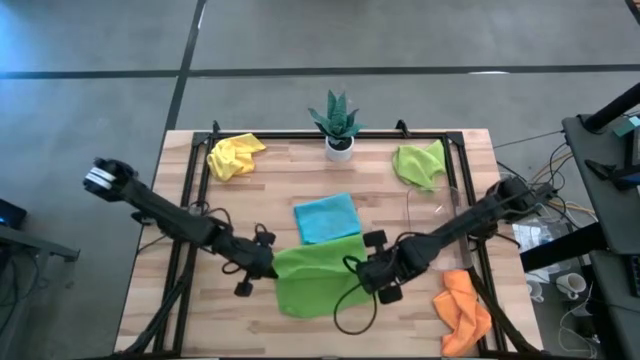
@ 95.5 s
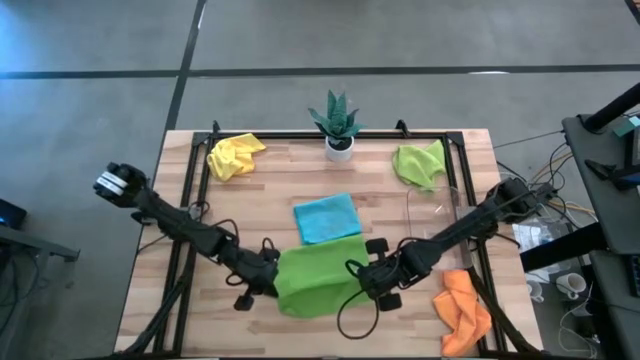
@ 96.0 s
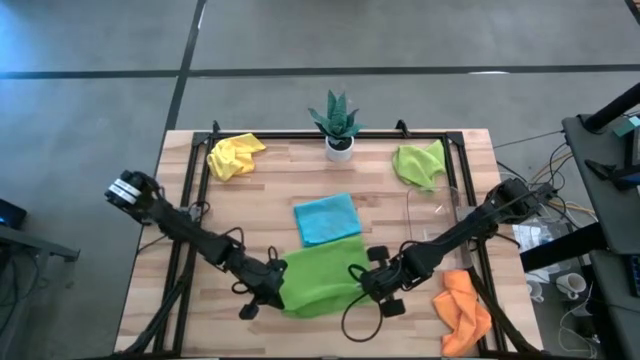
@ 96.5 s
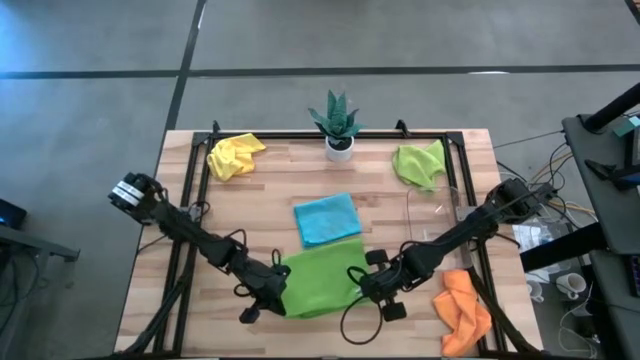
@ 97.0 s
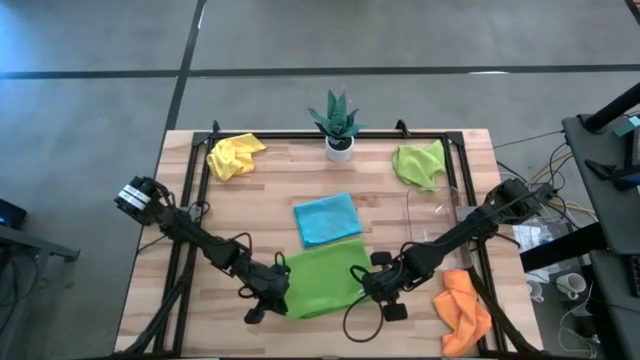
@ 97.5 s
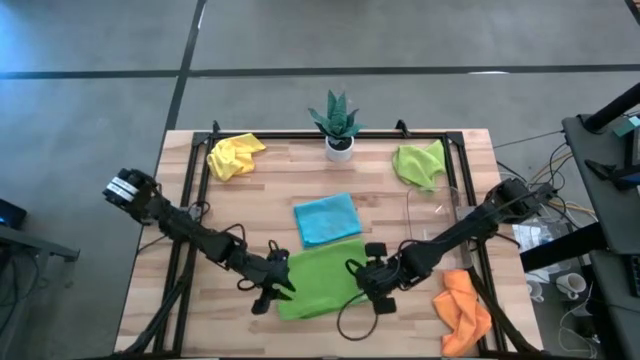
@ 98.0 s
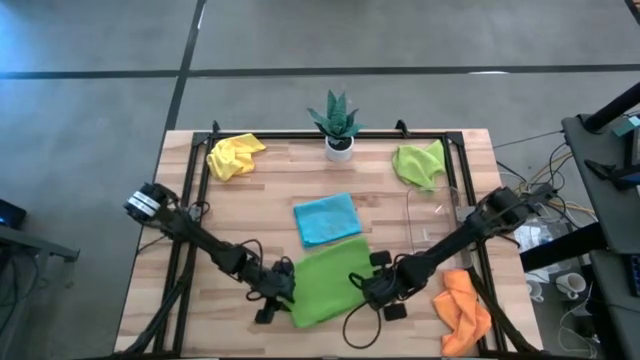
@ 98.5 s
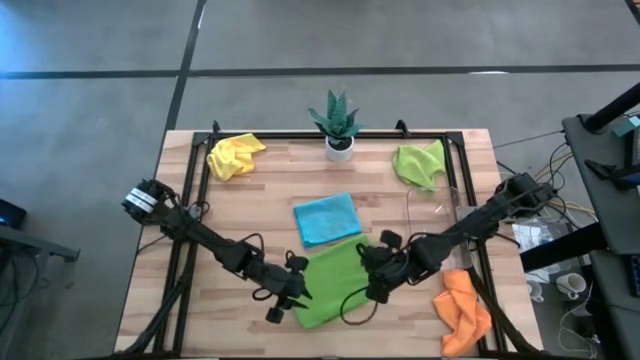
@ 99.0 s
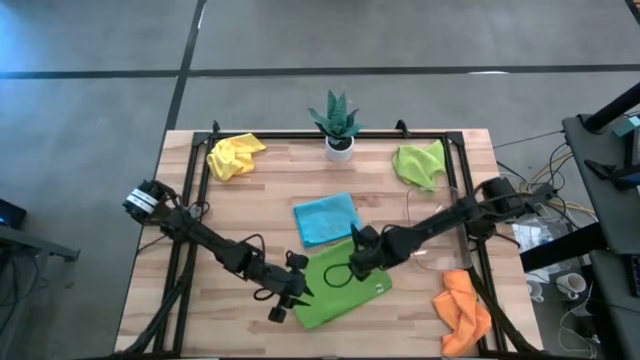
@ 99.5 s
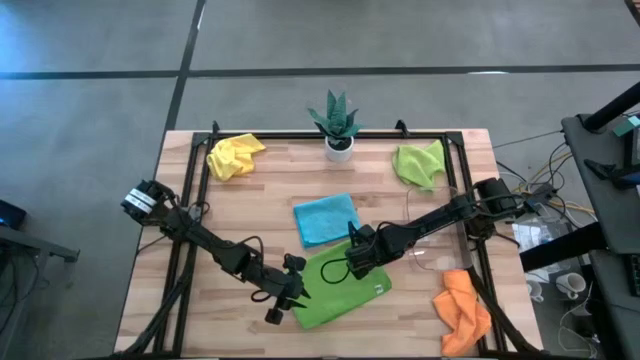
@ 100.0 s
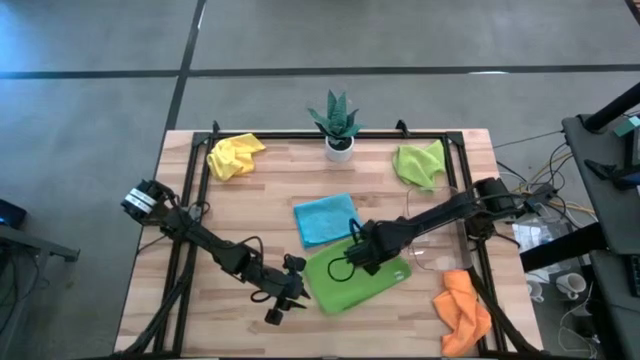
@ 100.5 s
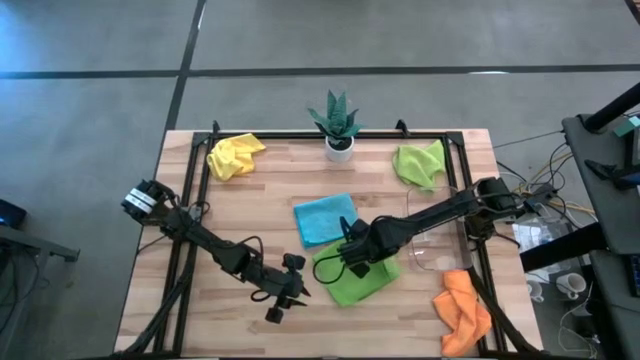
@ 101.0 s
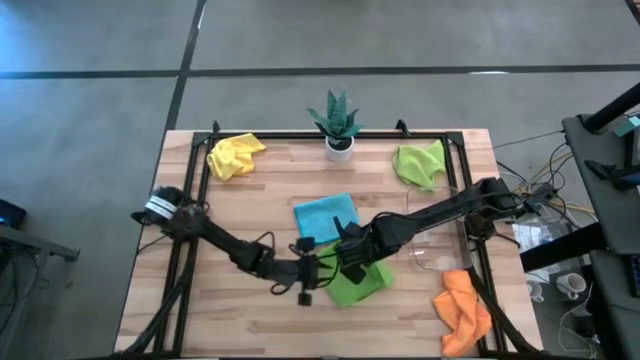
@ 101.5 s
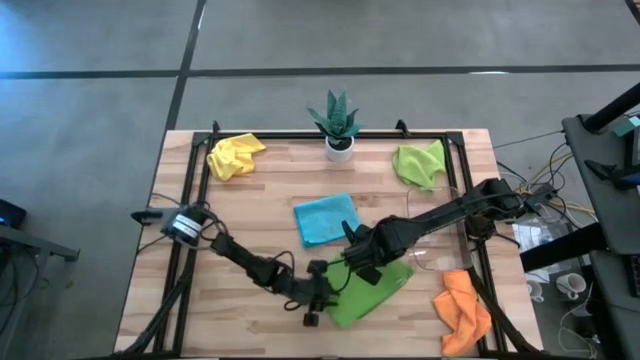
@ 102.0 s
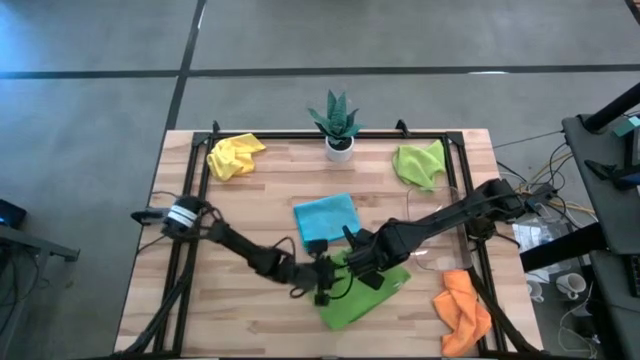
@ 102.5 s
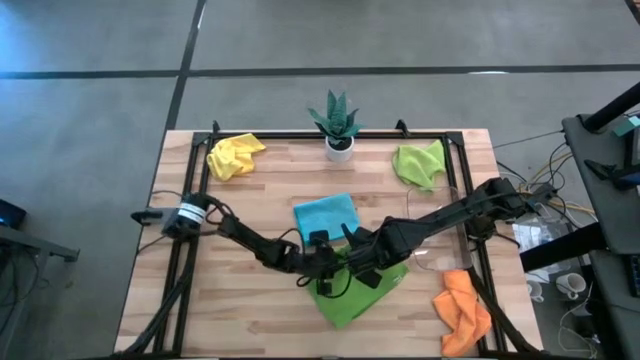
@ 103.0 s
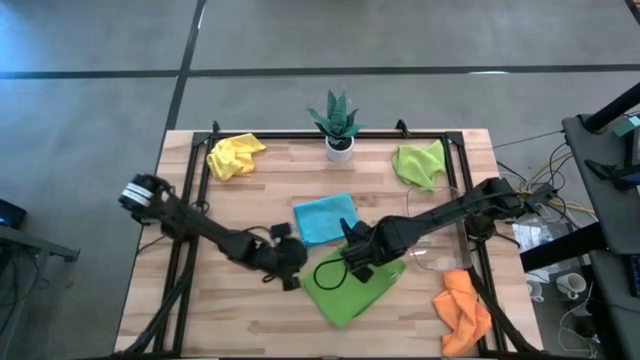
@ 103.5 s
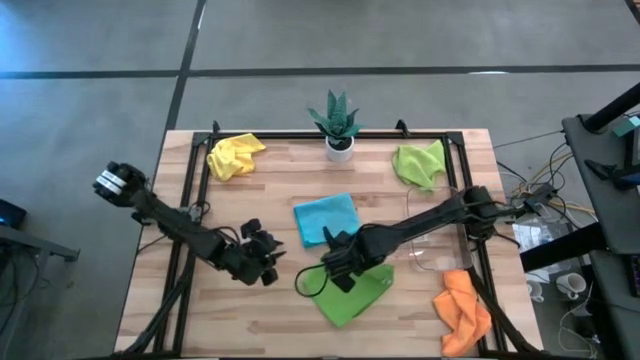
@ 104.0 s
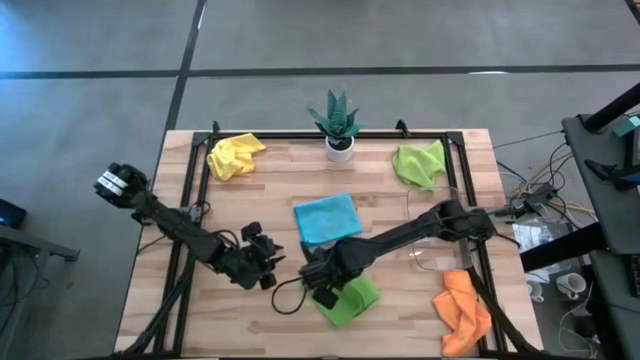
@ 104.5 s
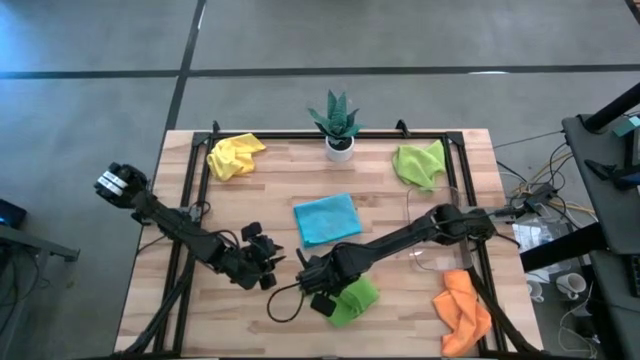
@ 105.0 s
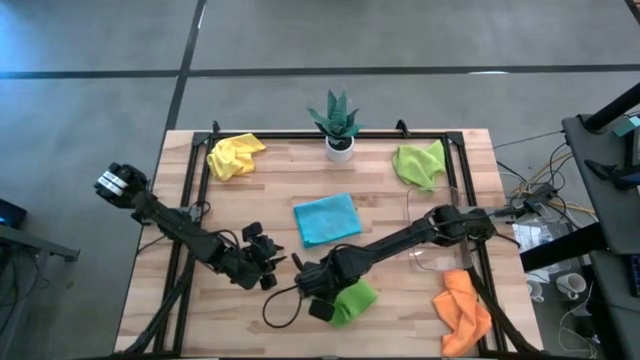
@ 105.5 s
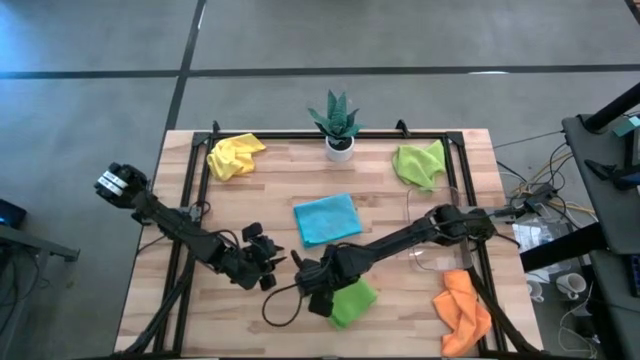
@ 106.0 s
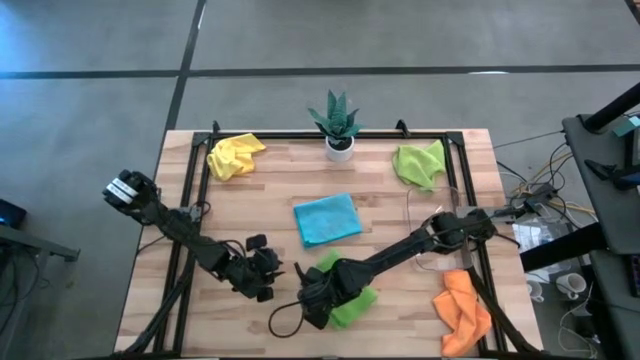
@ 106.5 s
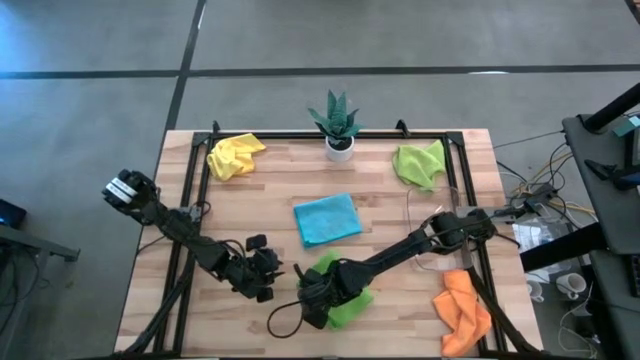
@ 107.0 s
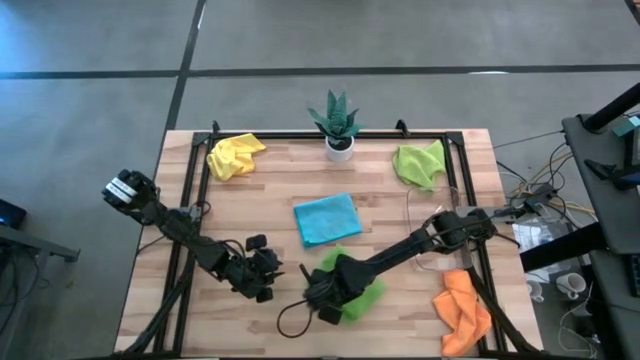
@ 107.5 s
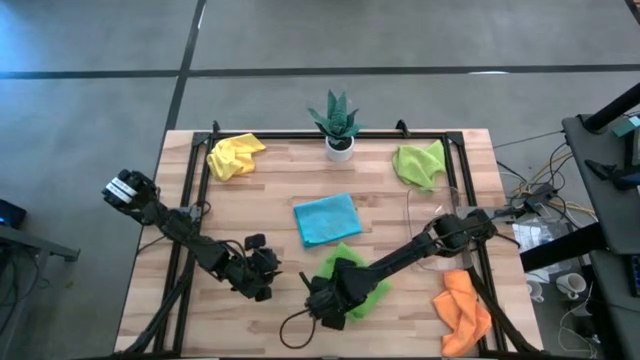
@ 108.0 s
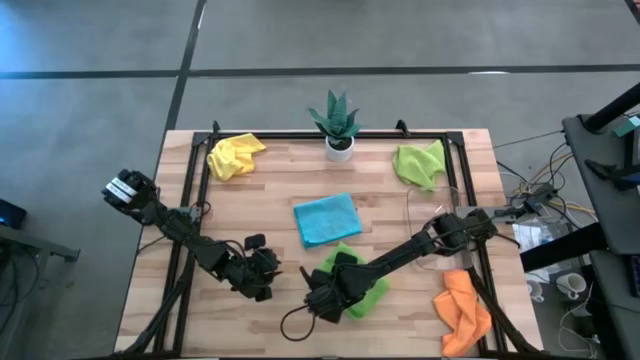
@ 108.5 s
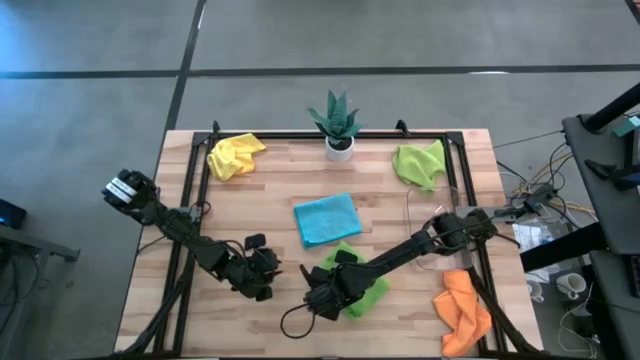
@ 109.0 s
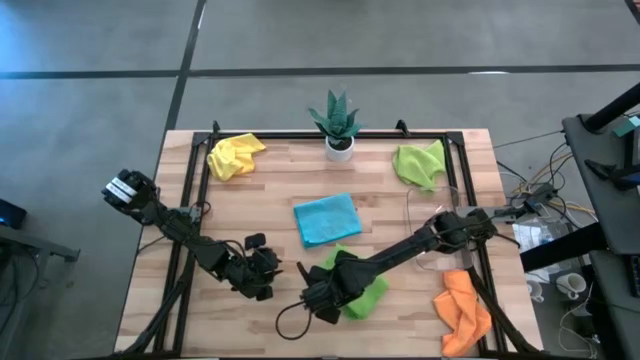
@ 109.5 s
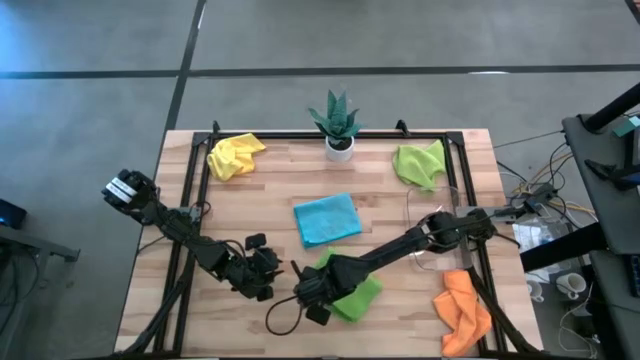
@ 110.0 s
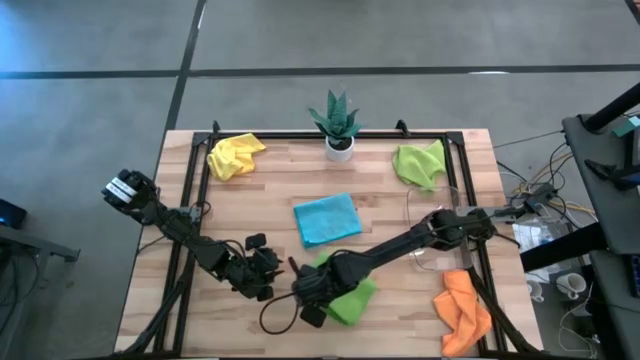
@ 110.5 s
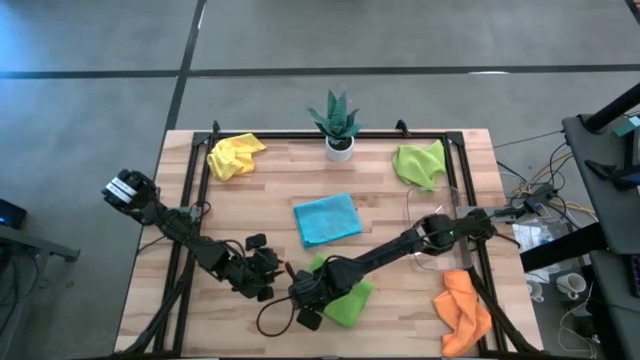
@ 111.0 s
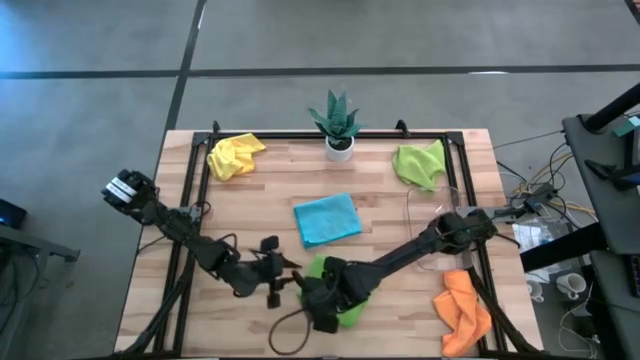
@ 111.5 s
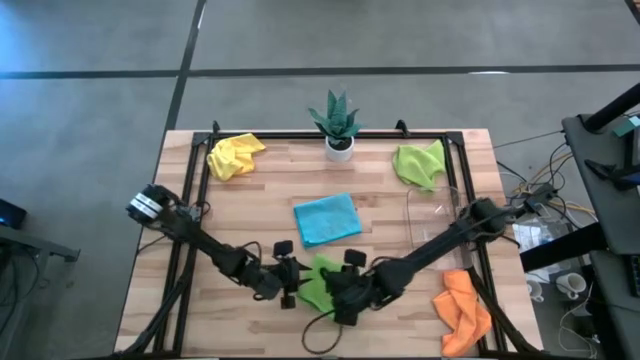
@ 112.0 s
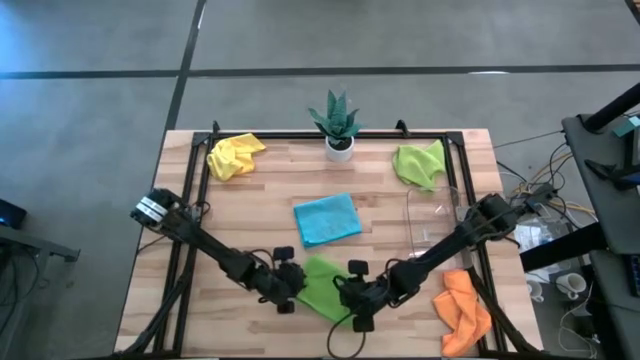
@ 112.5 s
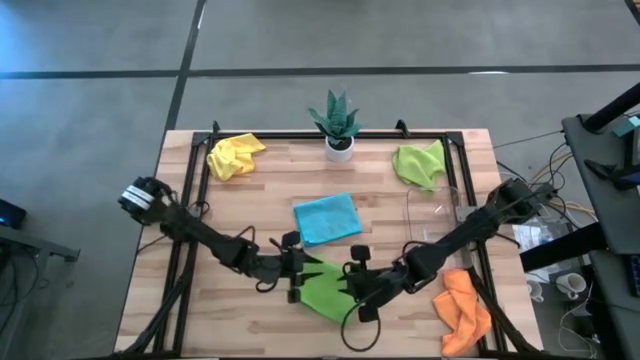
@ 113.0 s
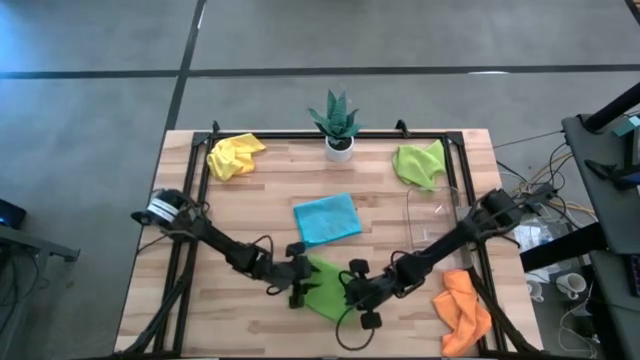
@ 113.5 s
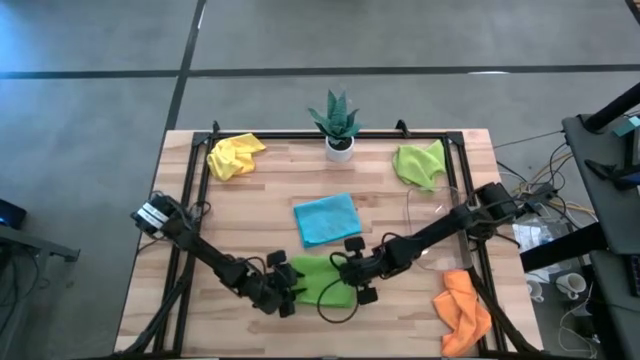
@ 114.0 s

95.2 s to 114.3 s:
Task: Fold microfiber towels
Fold the green towel on the table

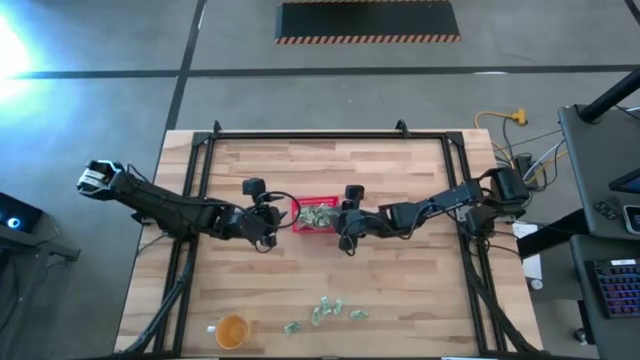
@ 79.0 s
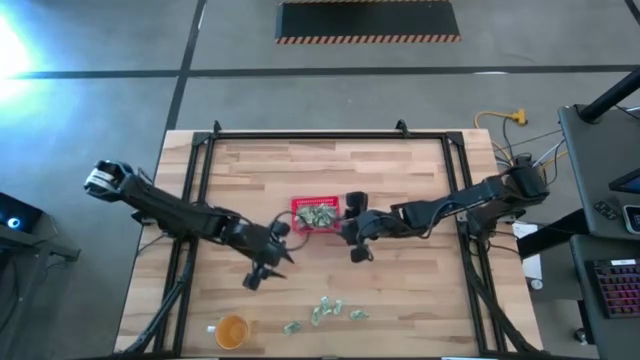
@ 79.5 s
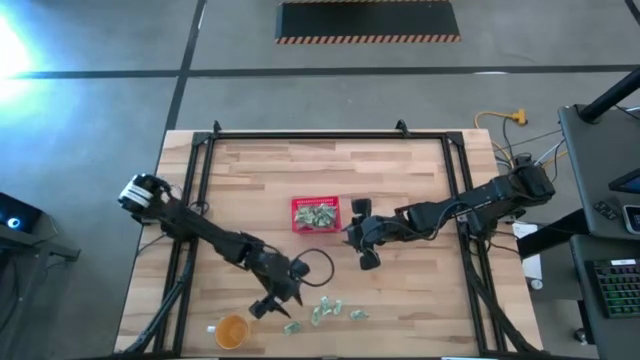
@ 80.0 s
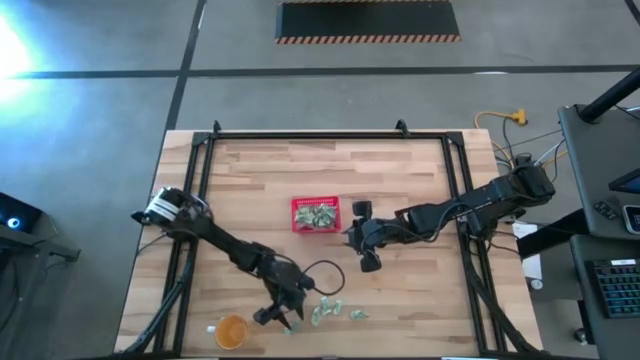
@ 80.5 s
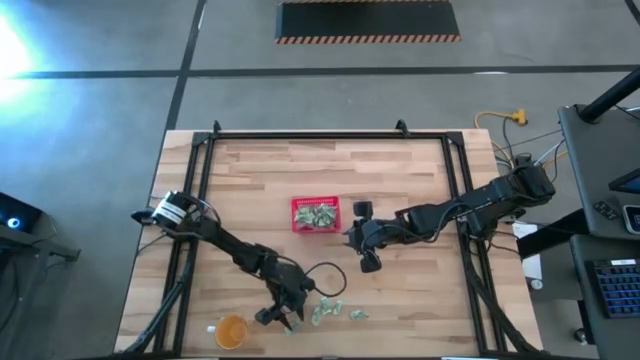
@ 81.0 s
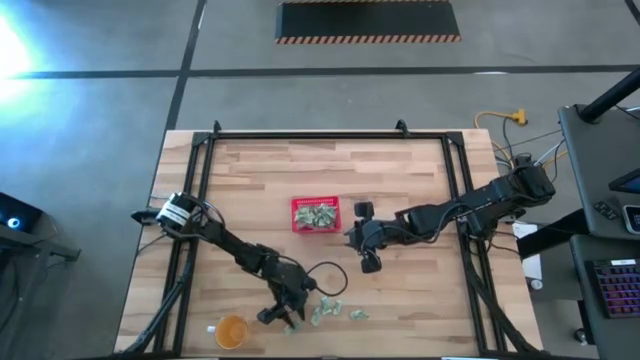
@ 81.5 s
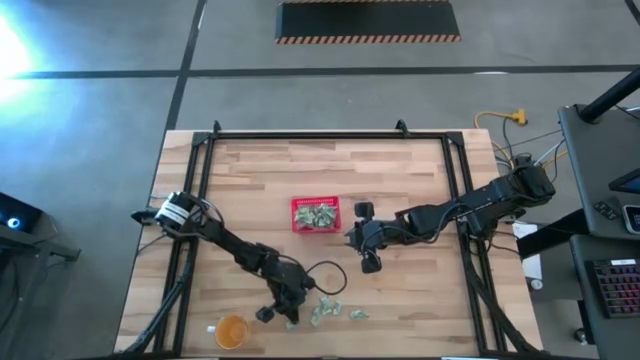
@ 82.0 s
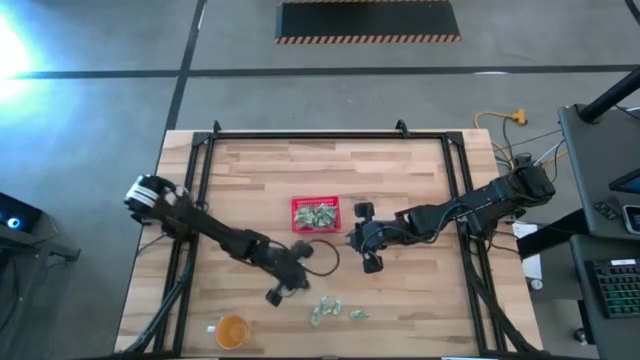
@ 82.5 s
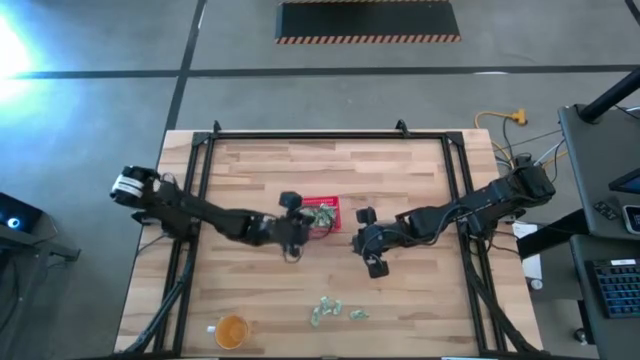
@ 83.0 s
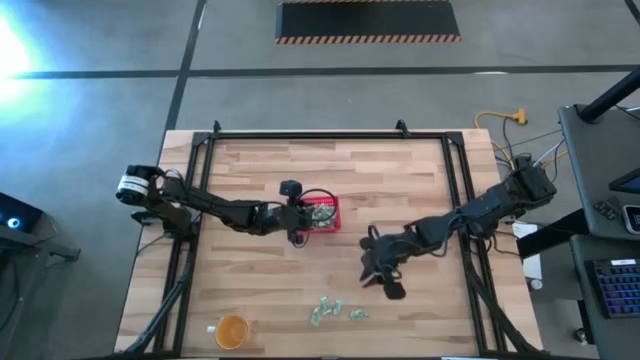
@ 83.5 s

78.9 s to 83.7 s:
Task: Pick and place items into bin
Put the stevia packet into the red bin
